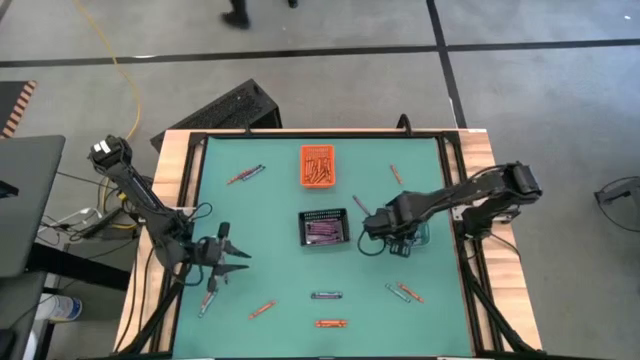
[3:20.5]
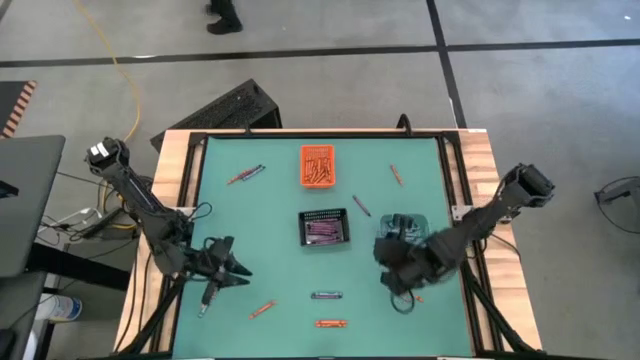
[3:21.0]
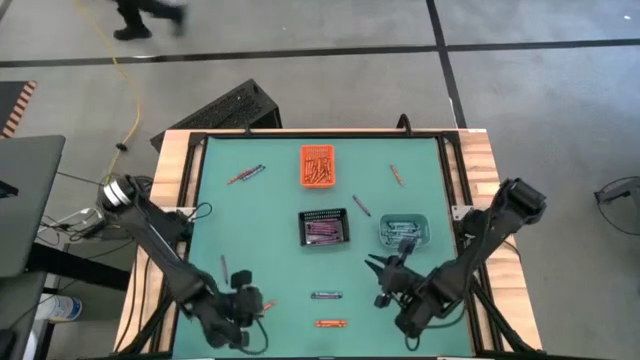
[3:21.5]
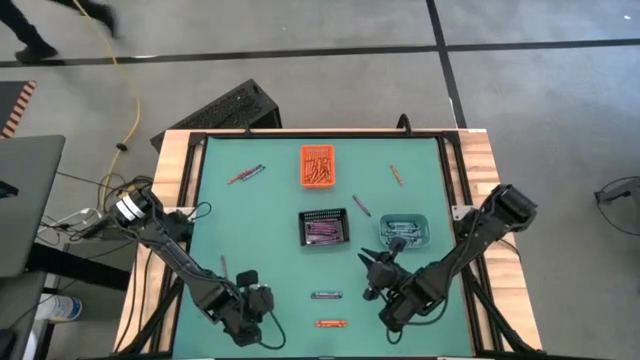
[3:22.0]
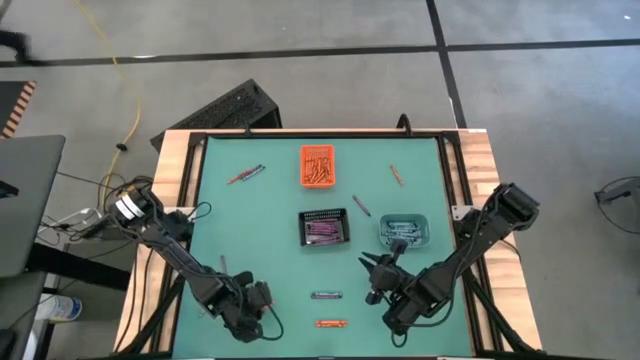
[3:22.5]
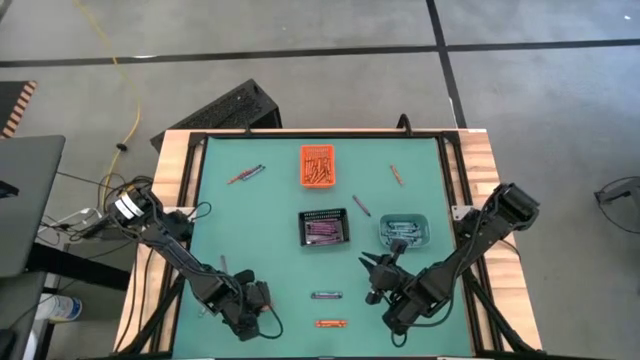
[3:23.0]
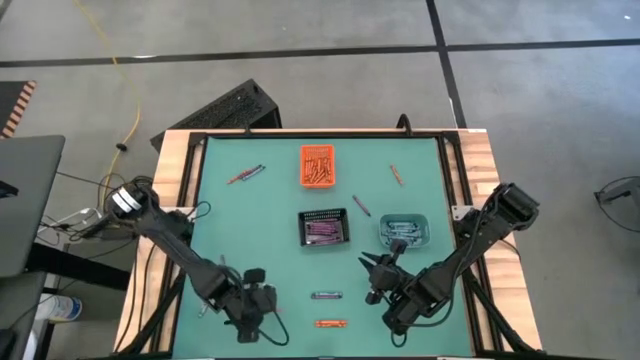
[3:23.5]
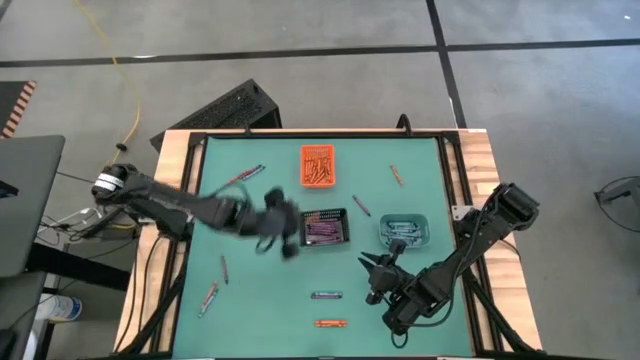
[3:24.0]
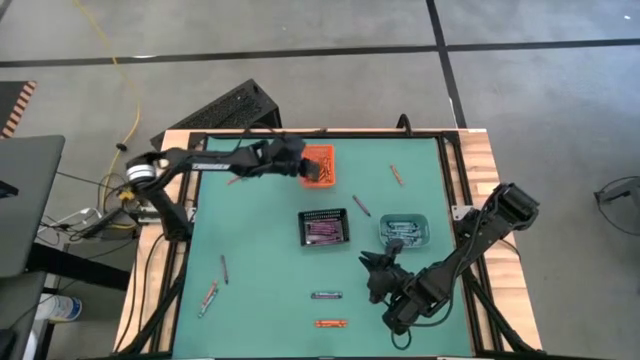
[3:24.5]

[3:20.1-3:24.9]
Task: Sort crayons
Put the orange crayon into the orange bin

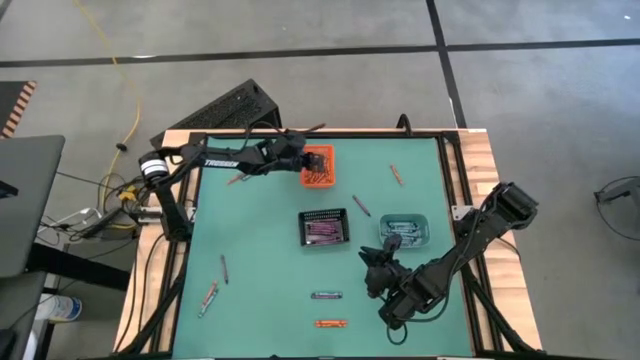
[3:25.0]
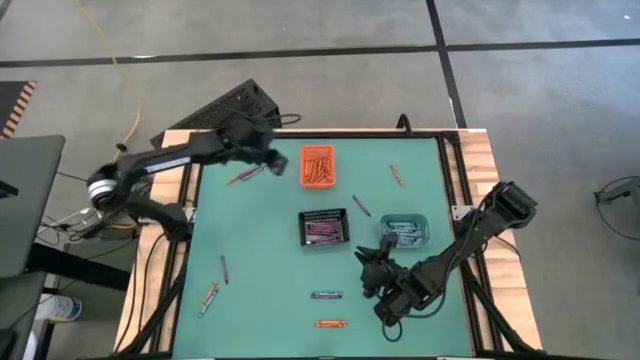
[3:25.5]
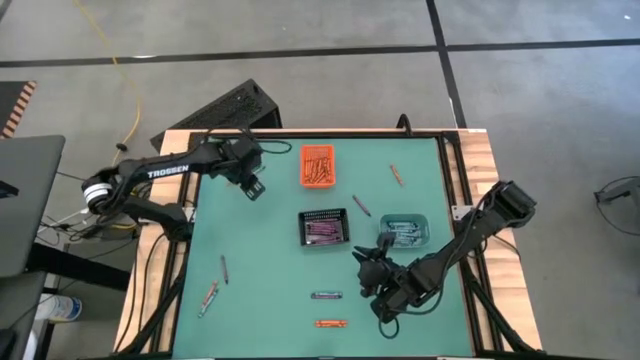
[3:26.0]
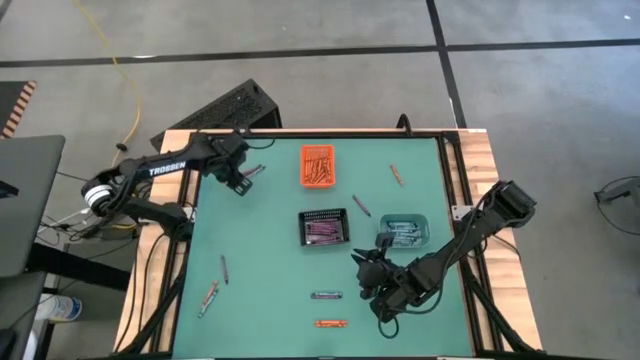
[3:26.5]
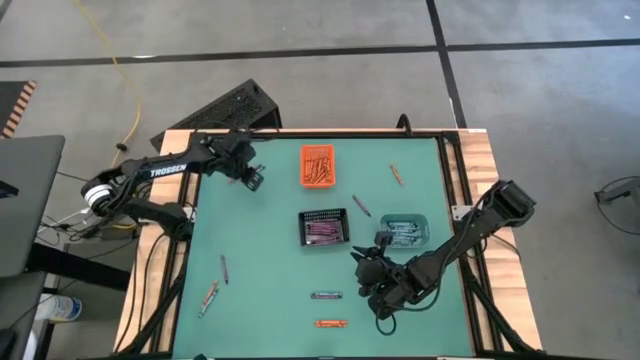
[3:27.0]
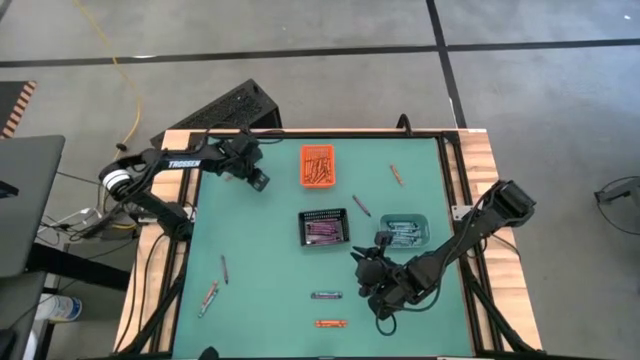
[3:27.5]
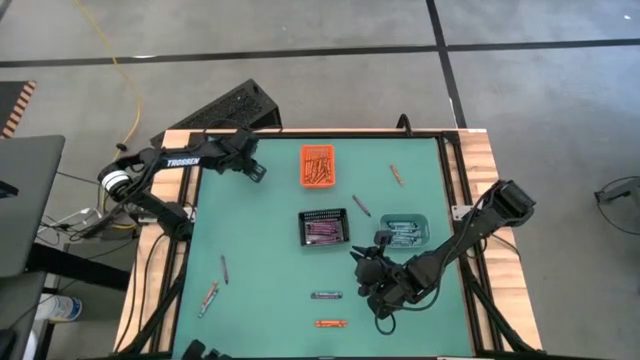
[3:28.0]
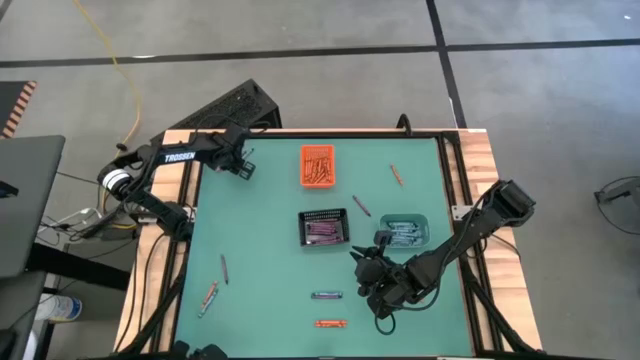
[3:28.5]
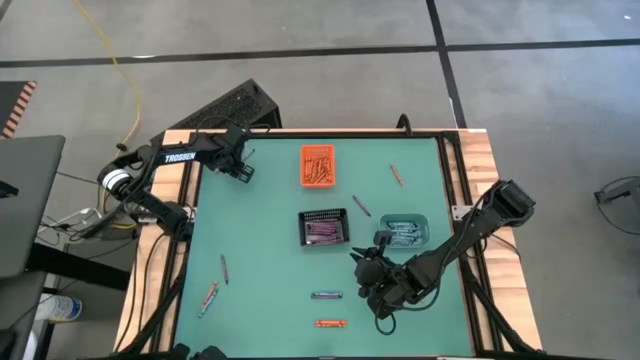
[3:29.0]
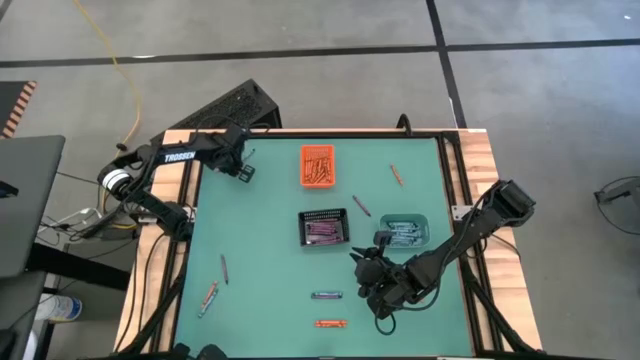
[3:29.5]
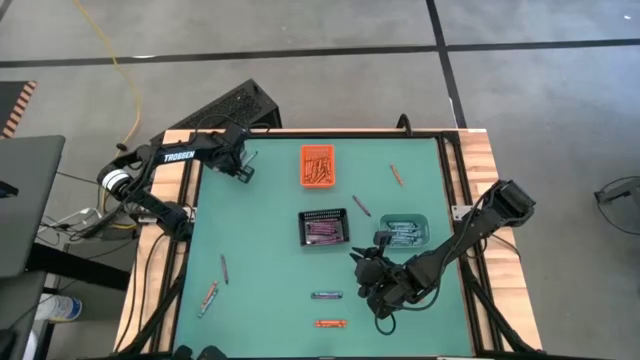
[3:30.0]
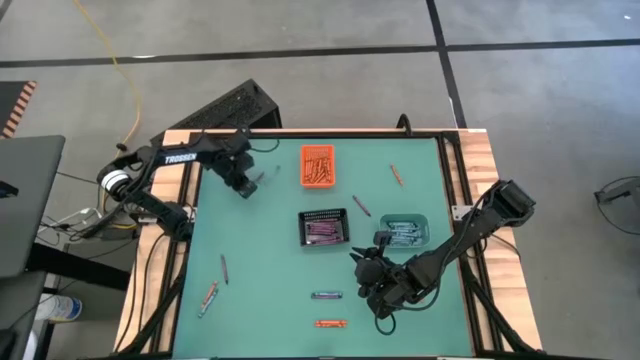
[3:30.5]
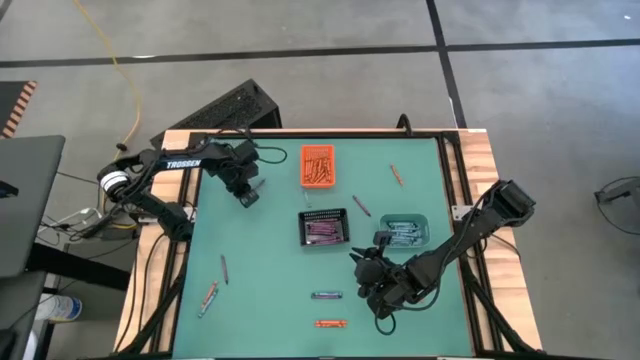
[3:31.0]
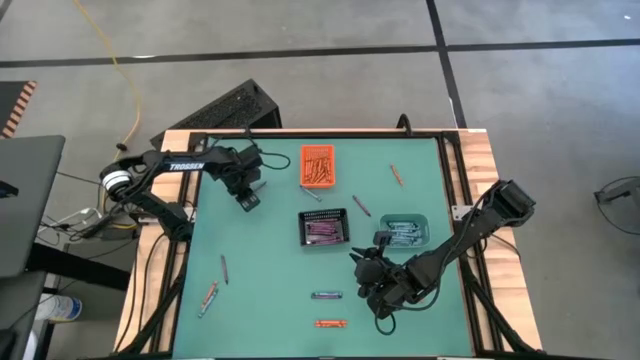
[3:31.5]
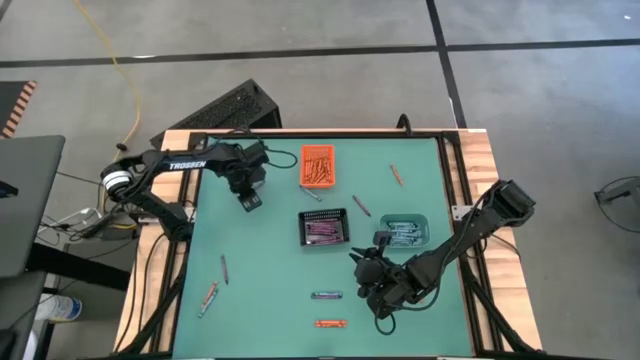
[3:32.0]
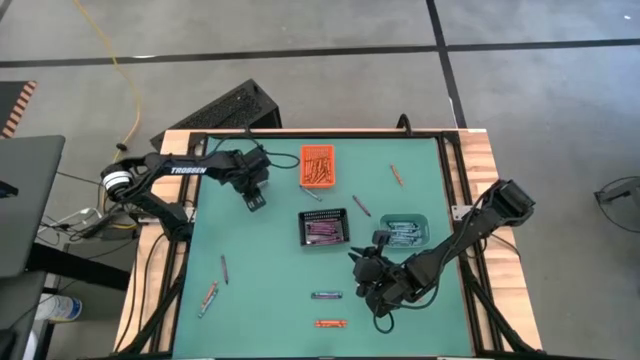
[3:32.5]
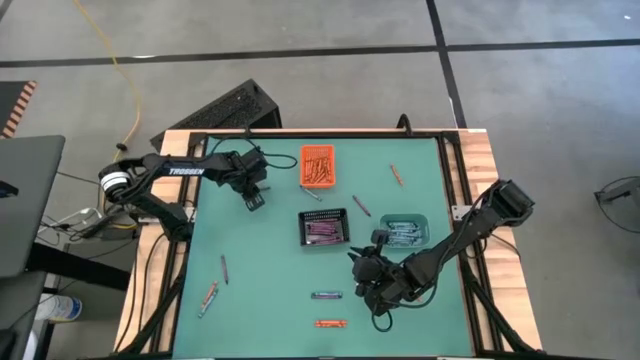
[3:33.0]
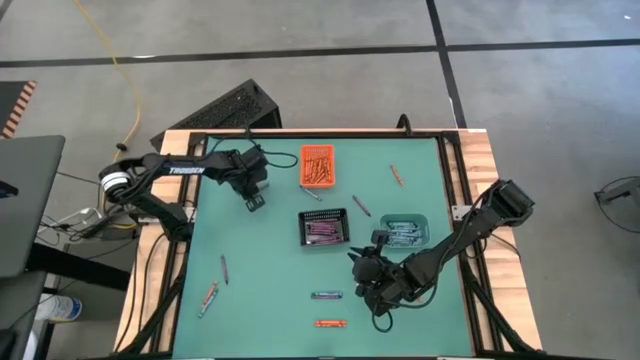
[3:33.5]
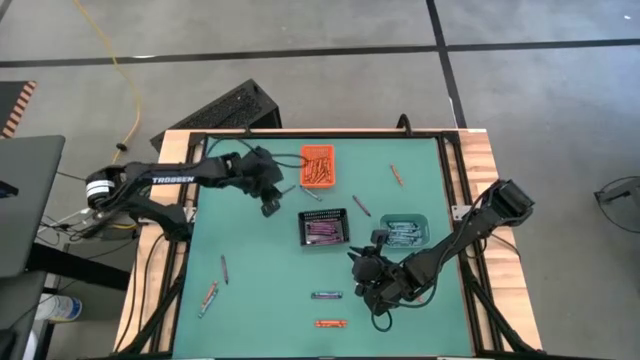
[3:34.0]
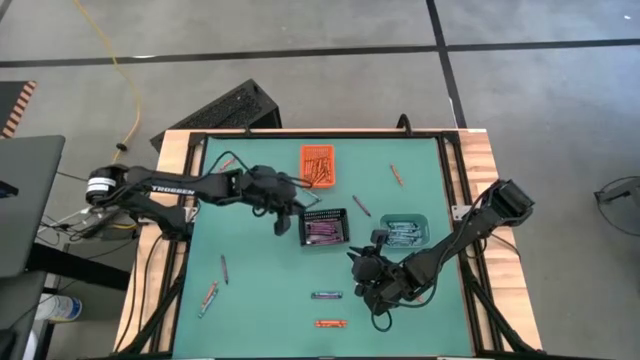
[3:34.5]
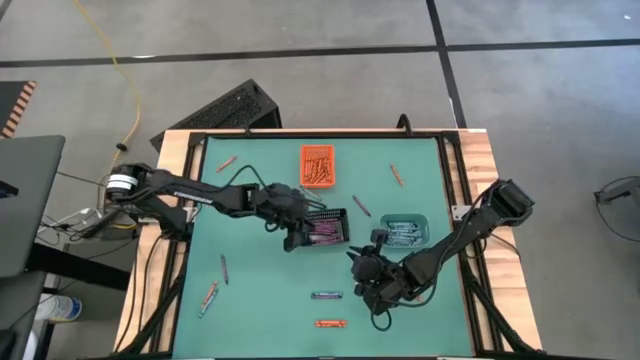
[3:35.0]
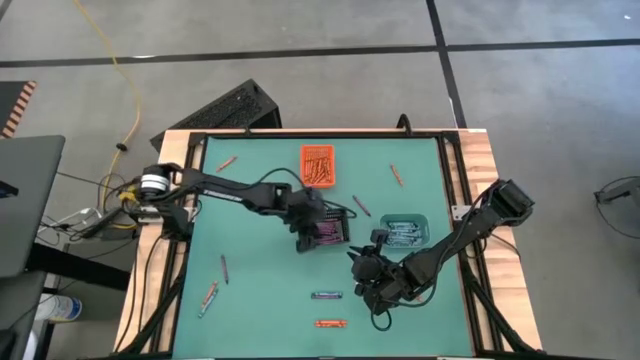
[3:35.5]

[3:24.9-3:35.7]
Put the violet crayon into the green bin

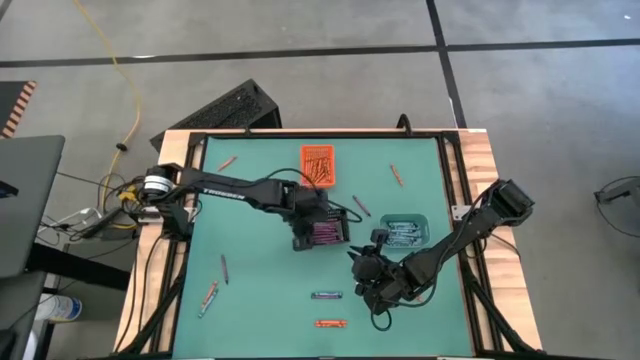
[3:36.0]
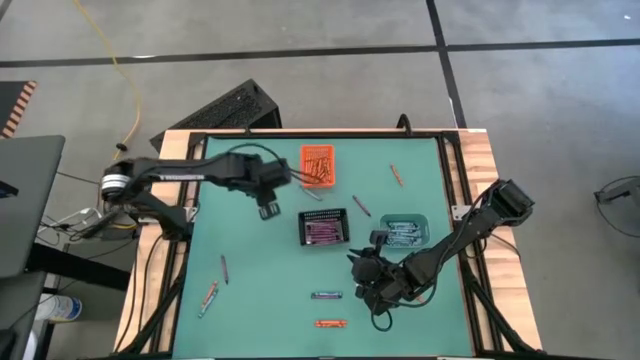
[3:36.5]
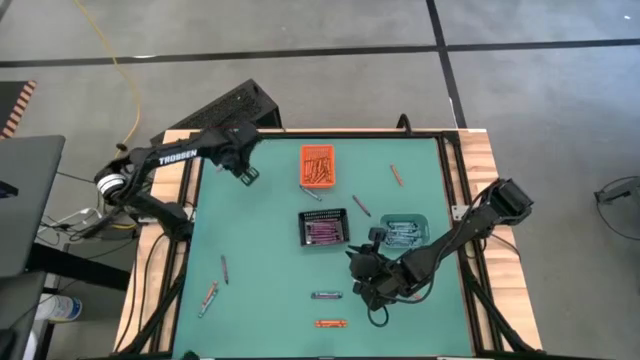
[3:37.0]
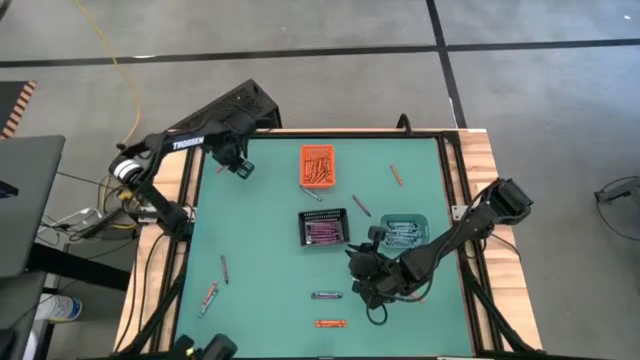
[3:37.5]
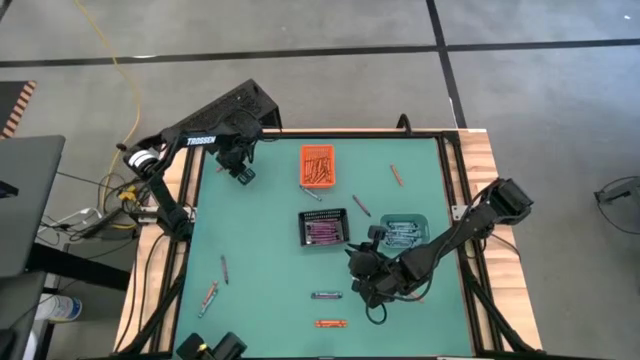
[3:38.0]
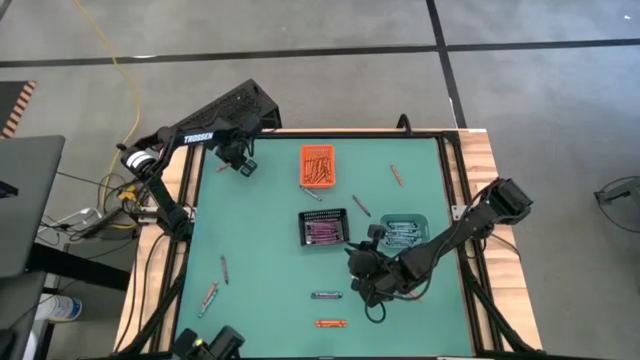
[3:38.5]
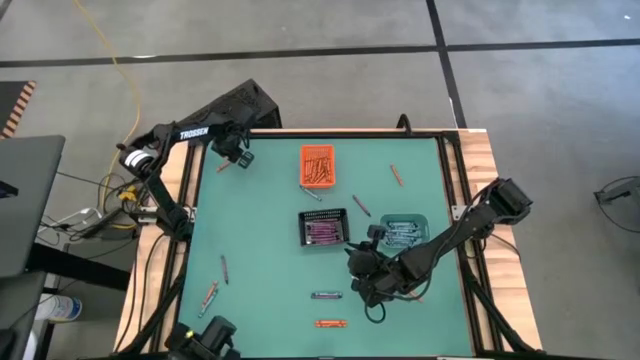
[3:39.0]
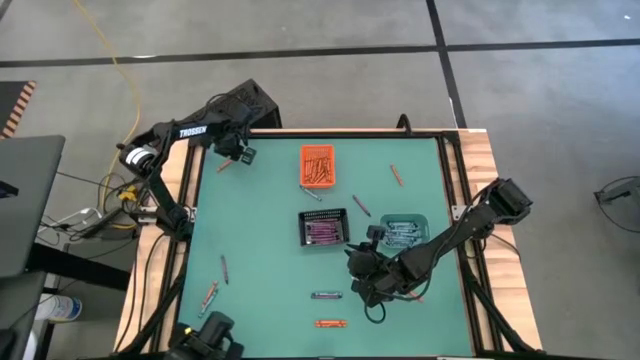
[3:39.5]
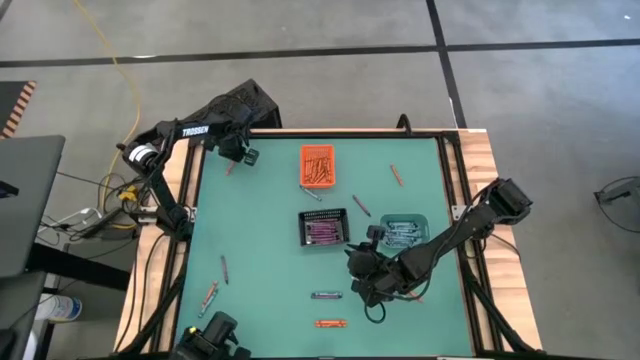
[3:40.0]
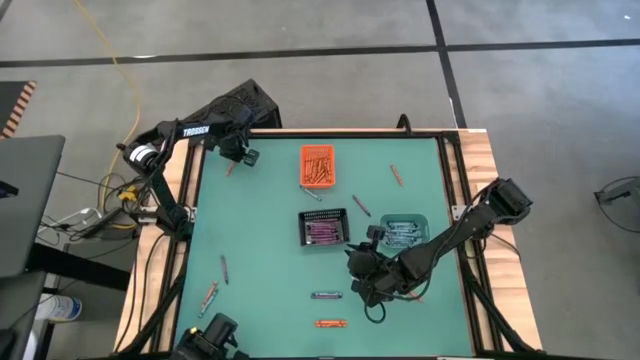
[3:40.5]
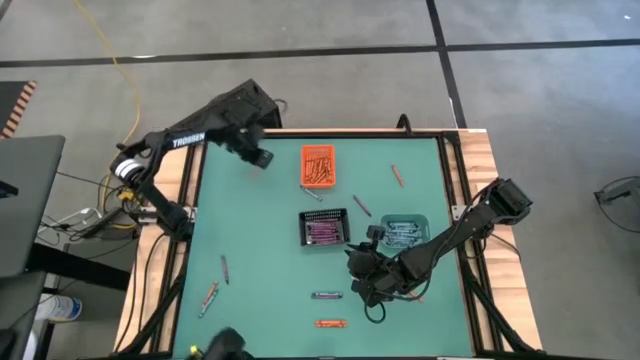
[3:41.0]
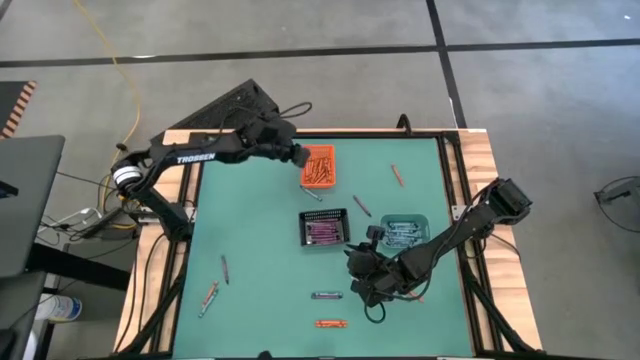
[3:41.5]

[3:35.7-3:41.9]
Put the orange crayon into the orange bin
